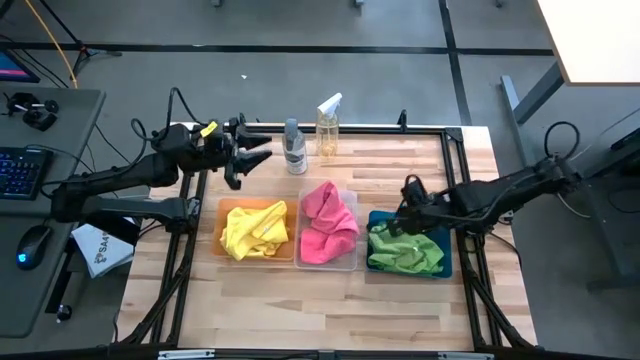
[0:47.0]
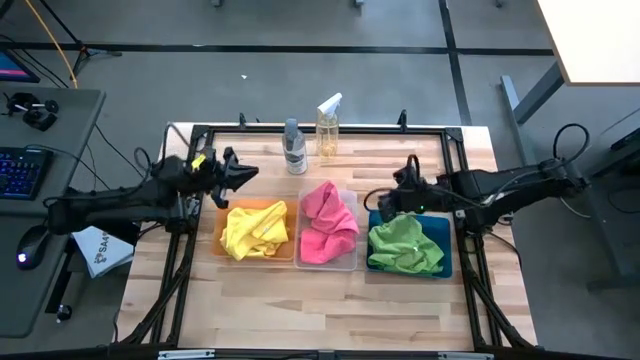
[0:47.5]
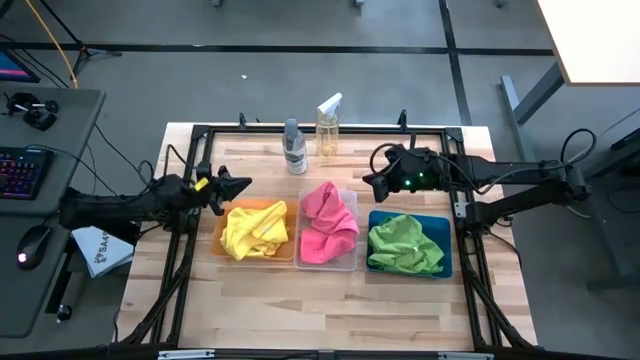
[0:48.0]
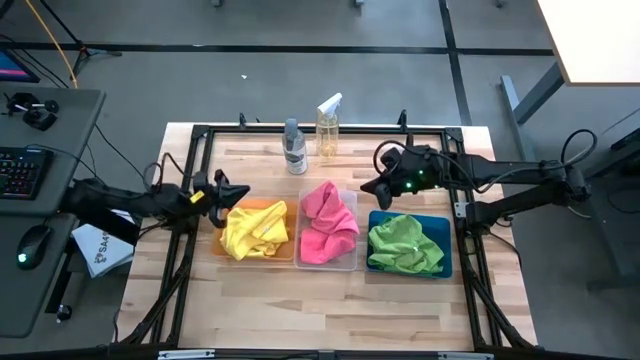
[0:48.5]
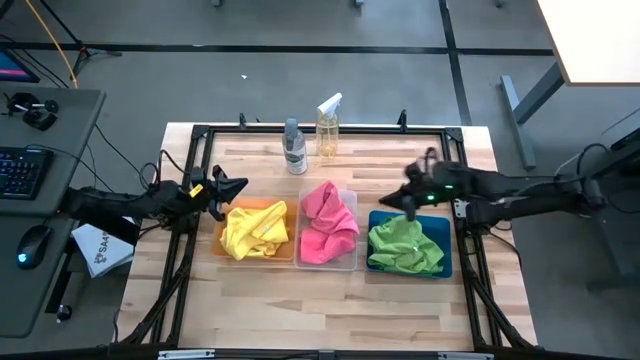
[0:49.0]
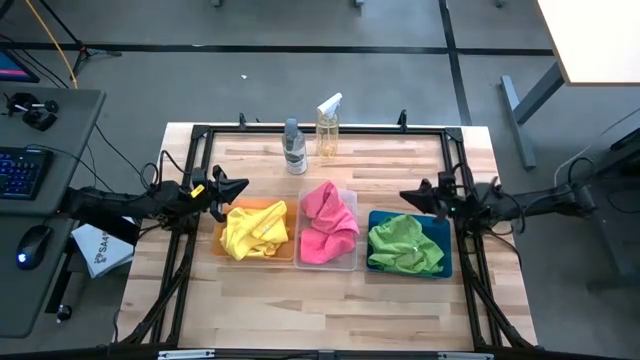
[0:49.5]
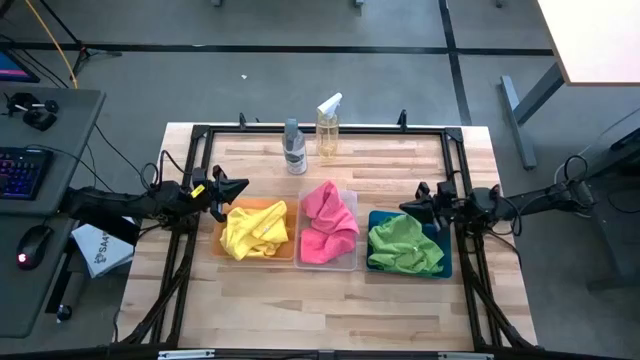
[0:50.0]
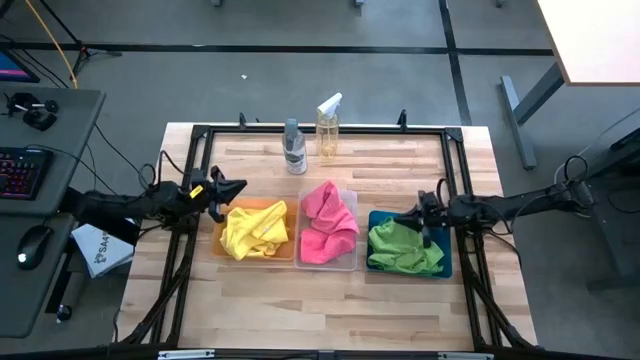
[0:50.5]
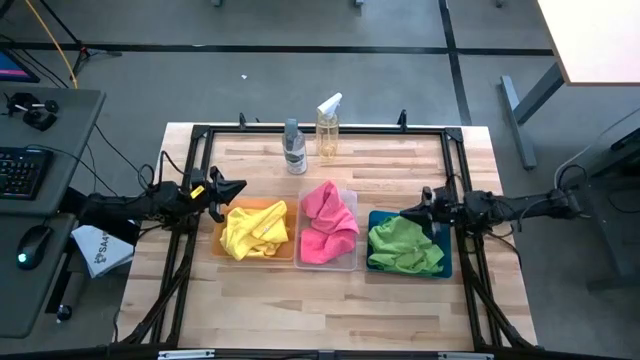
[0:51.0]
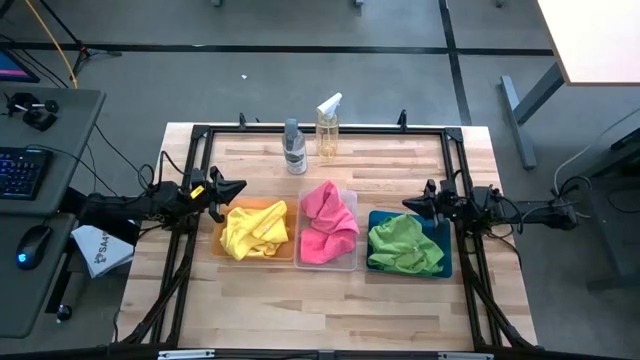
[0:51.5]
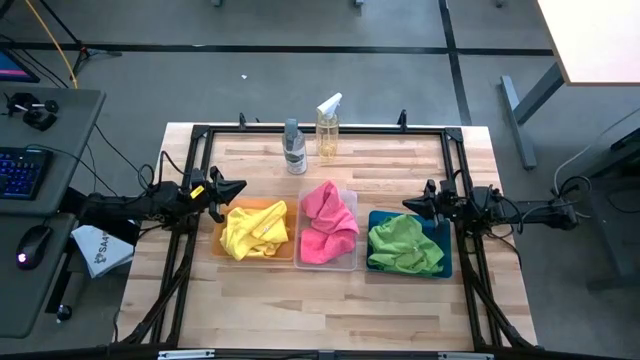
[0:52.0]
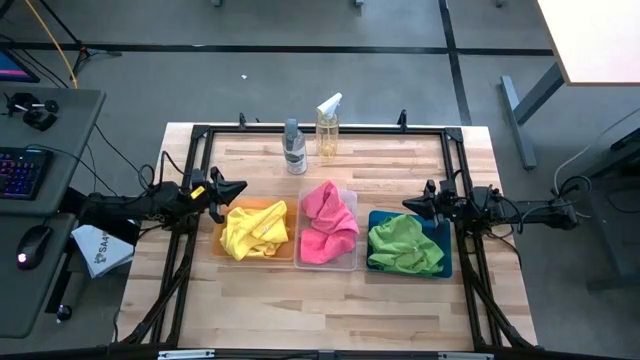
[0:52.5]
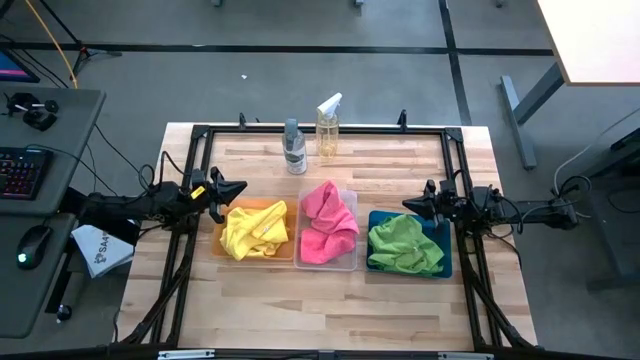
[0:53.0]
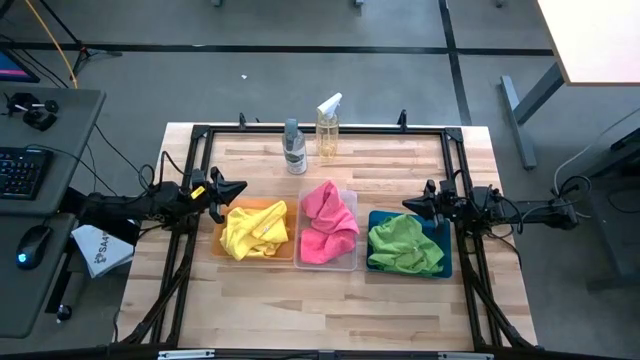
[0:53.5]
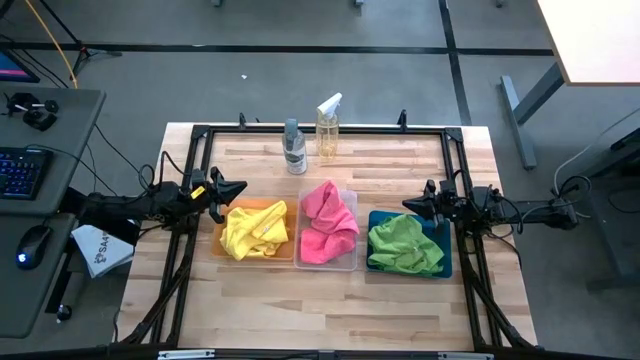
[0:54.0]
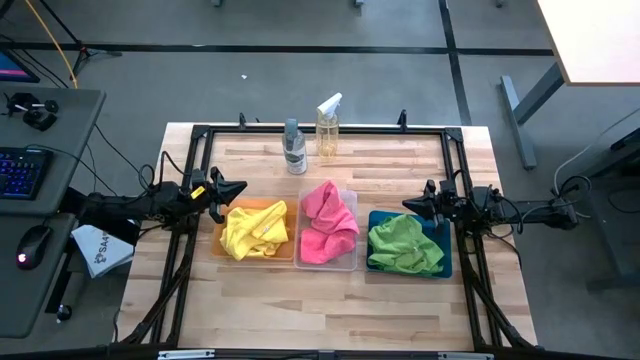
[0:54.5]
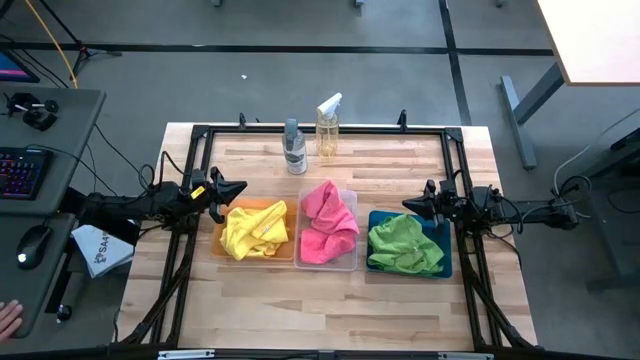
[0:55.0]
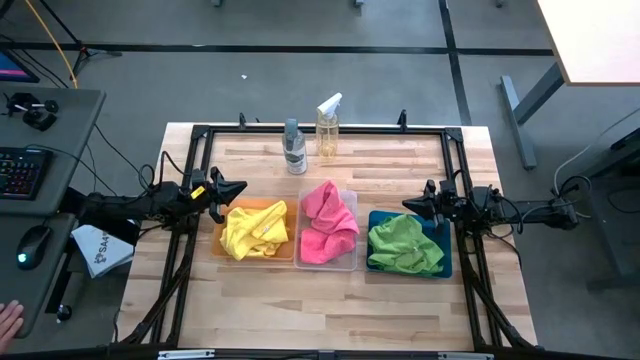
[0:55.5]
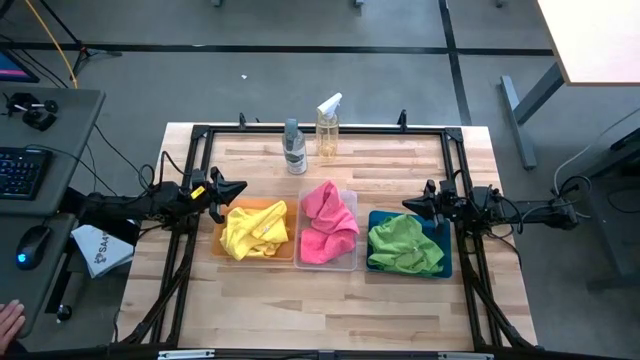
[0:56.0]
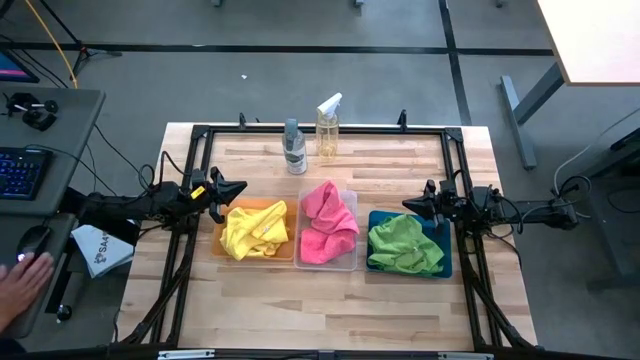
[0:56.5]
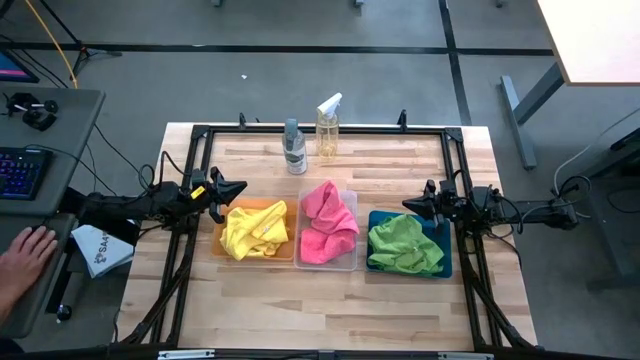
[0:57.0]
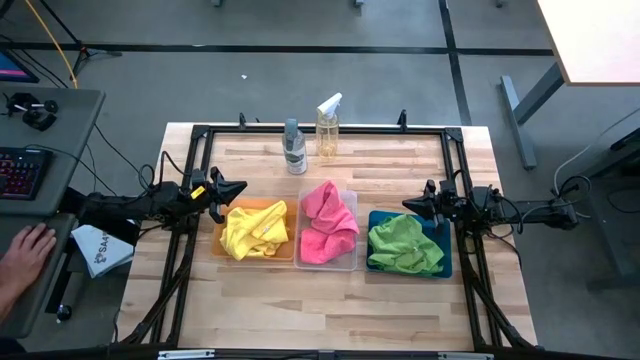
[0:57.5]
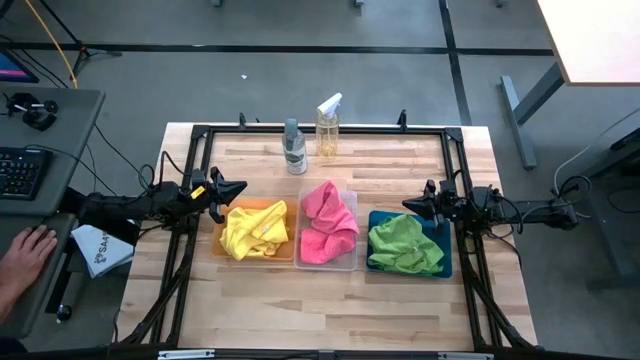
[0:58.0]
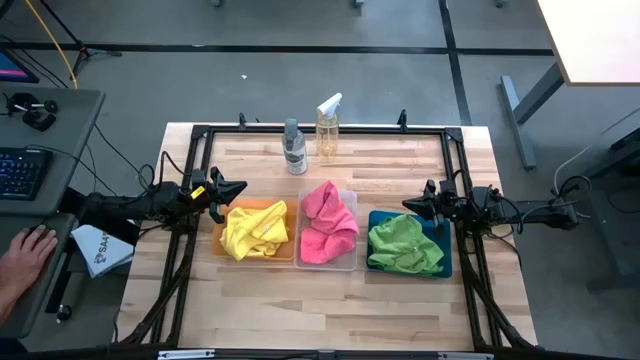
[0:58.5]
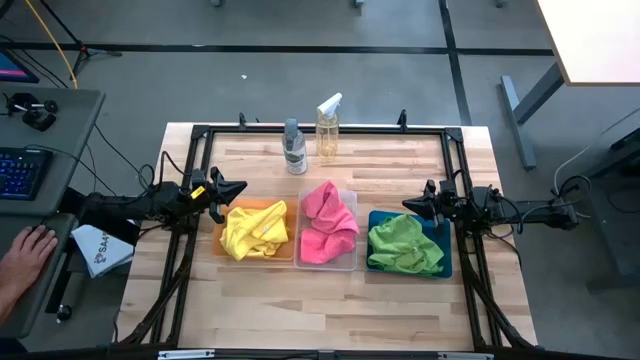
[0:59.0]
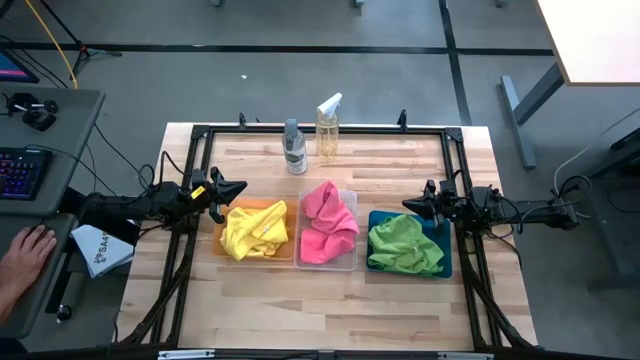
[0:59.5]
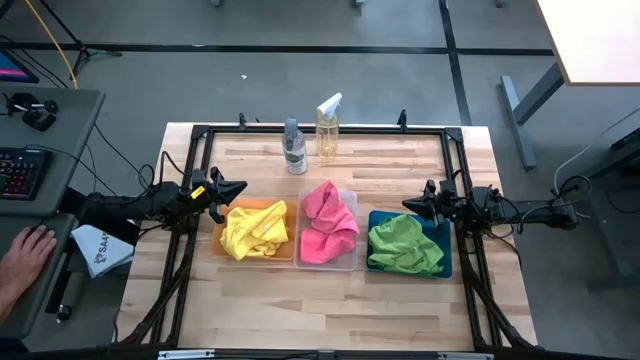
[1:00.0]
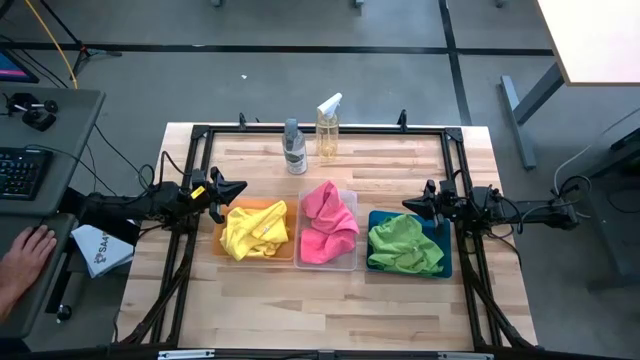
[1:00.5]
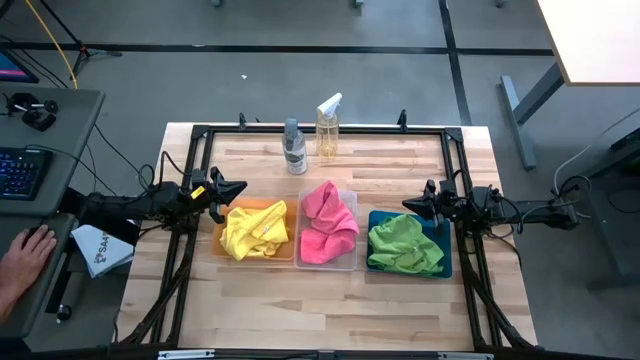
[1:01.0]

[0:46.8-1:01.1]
Task: Sort microfiber towel by color & place in baskets
Return to Home Position

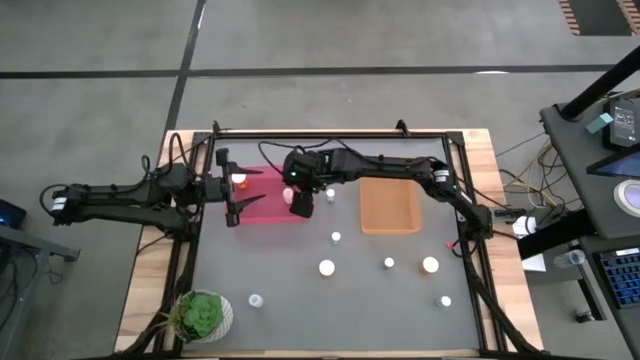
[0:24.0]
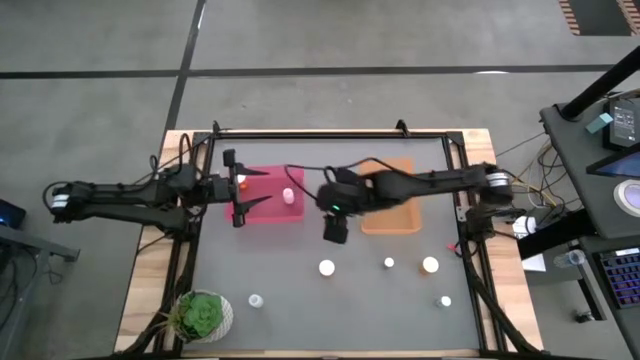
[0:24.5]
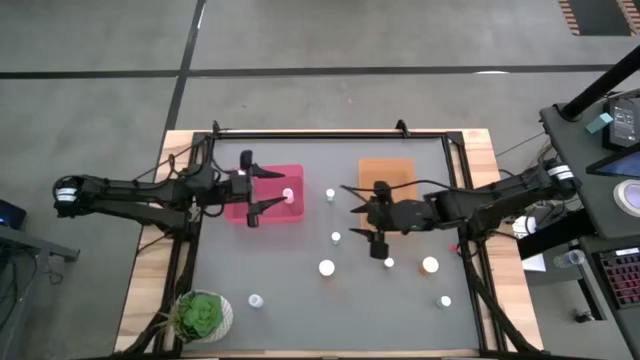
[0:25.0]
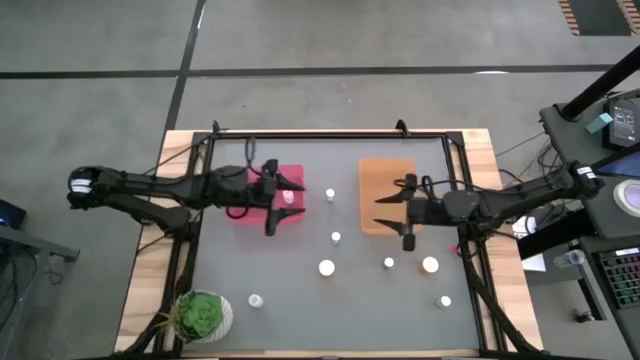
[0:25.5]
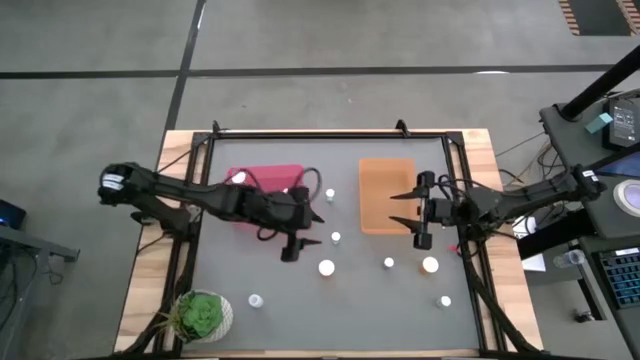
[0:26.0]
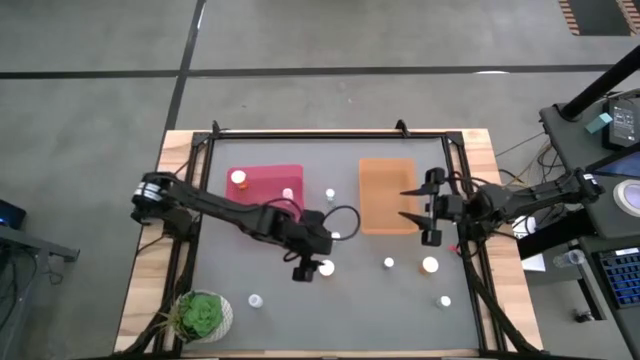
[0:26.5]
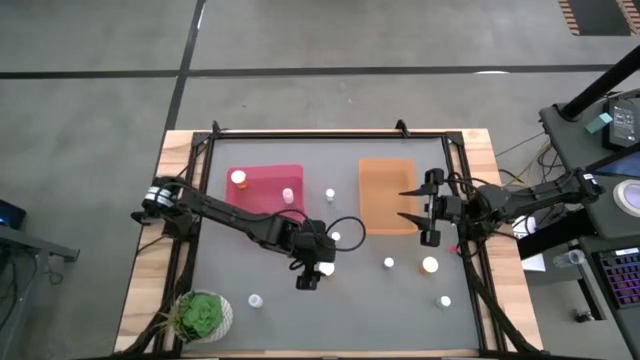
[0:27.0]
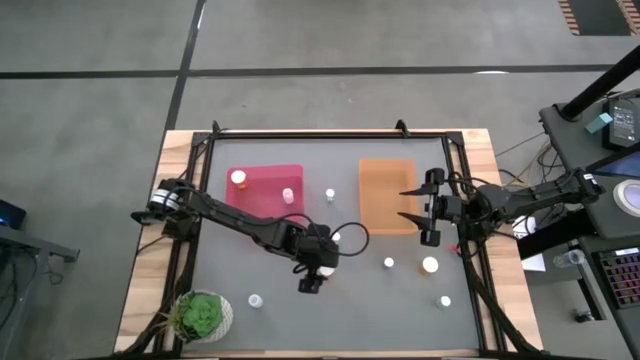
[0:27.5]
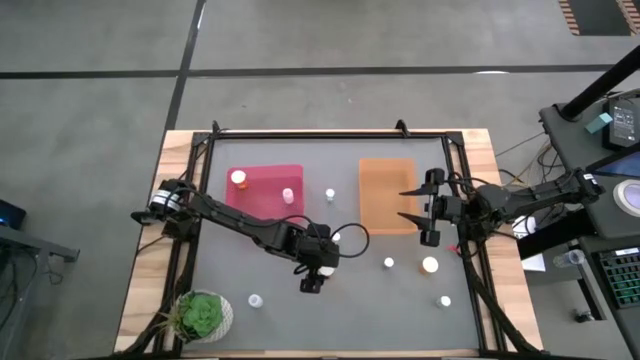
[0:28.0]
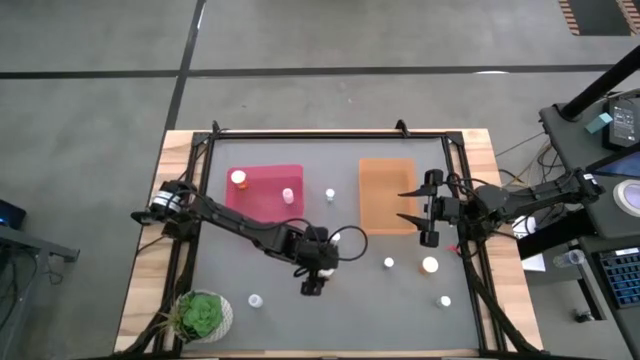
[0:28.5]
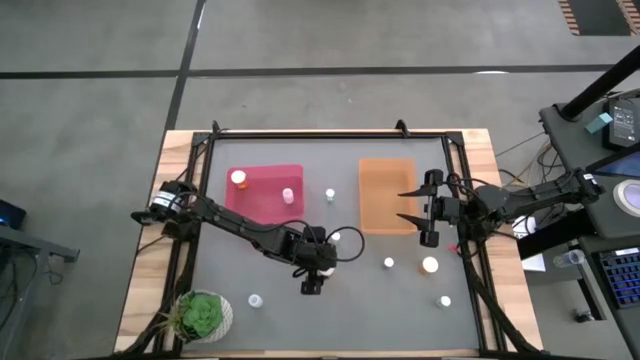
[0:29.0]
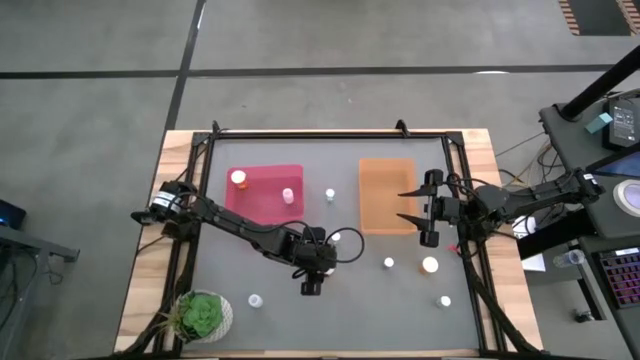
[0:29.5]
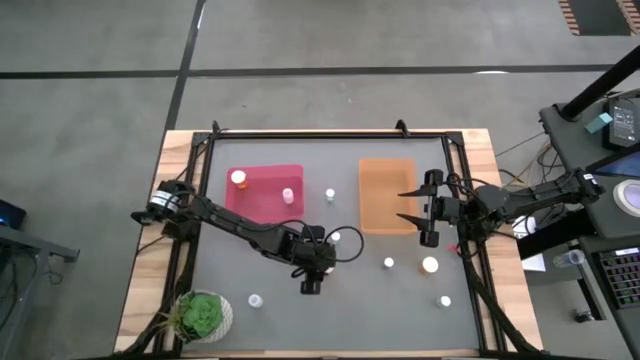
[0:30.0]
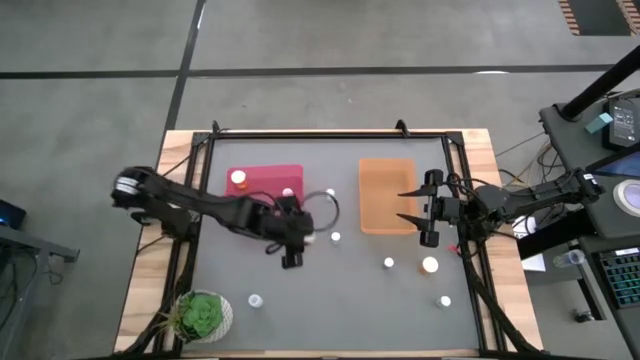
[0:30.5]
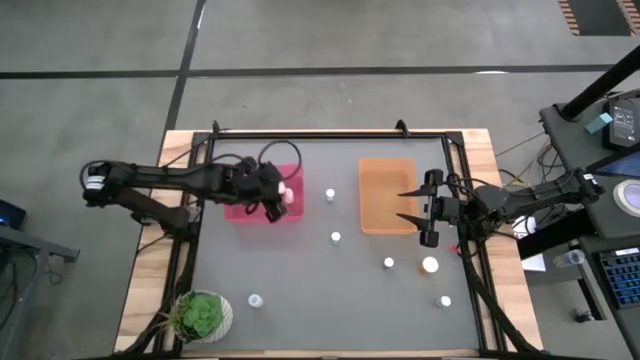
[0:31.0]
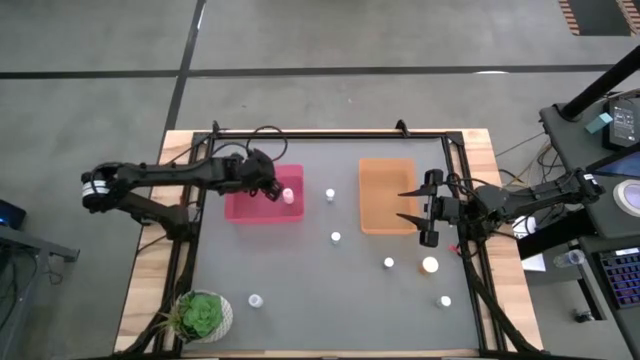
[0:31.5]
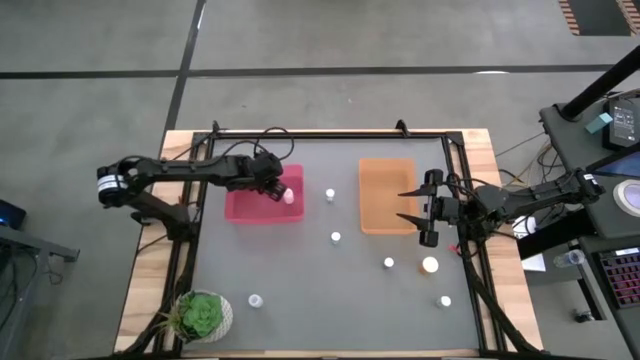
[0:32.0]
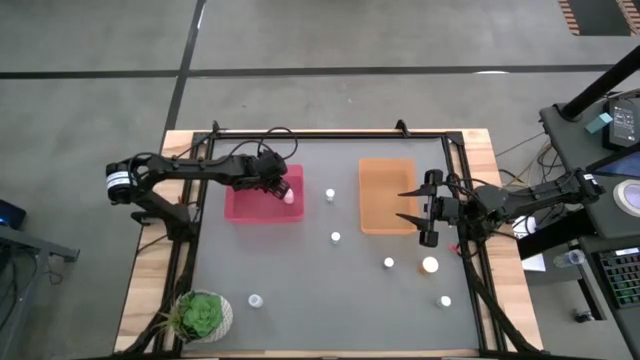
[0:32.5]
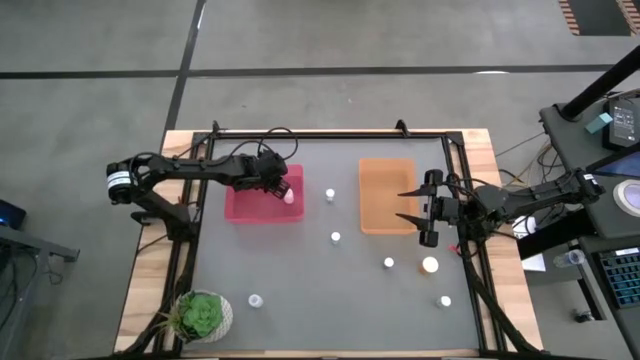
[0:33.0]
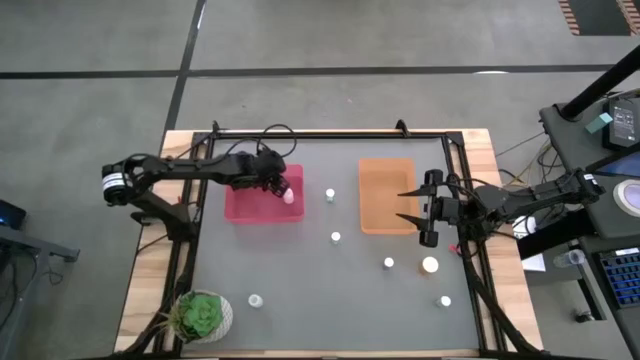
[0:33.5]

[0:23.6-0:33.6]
Task: Pick and place medicine bottles into bin by pill shape (circle, oval)
Put the left orange pill into the pink bin
